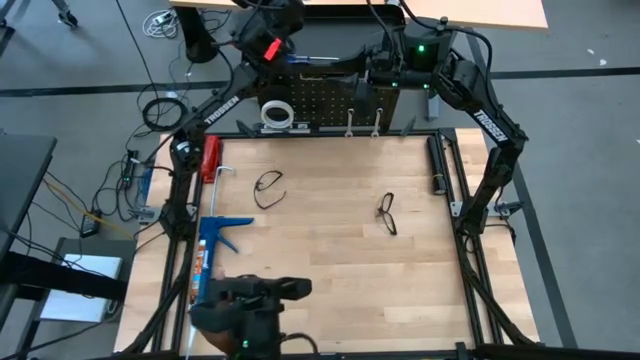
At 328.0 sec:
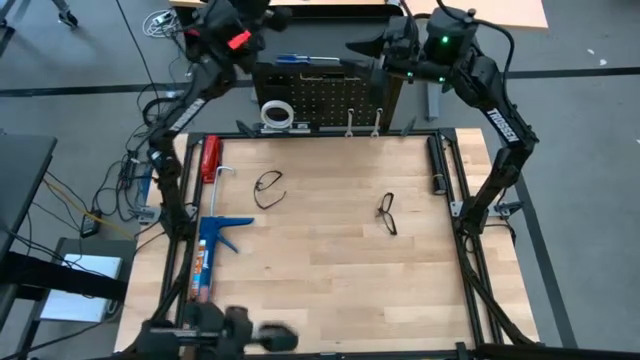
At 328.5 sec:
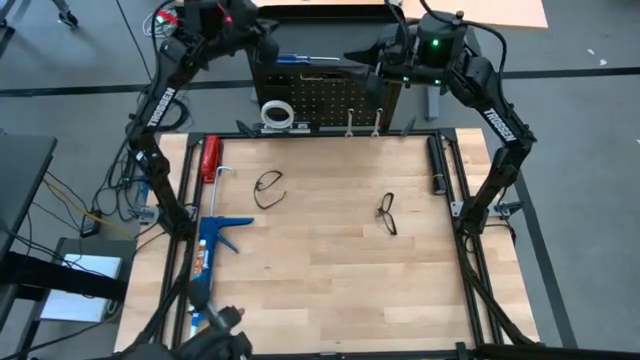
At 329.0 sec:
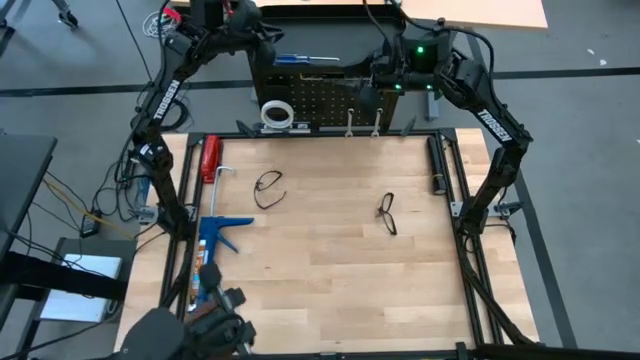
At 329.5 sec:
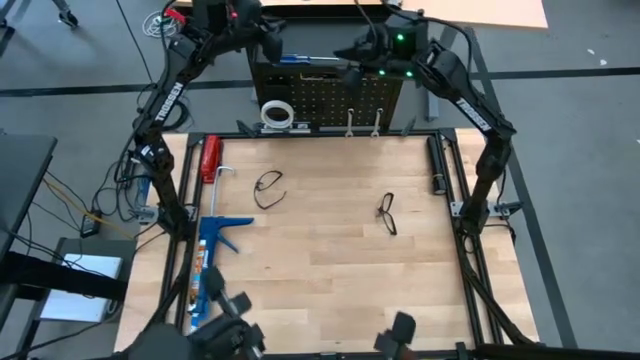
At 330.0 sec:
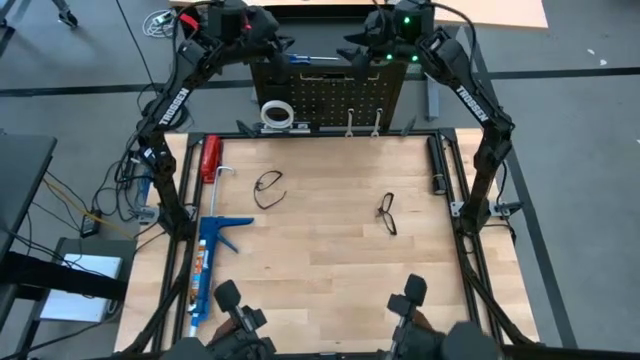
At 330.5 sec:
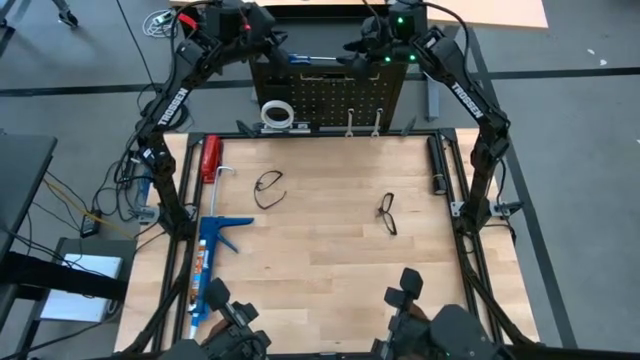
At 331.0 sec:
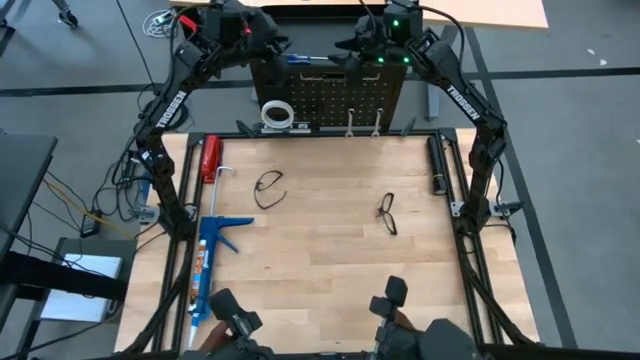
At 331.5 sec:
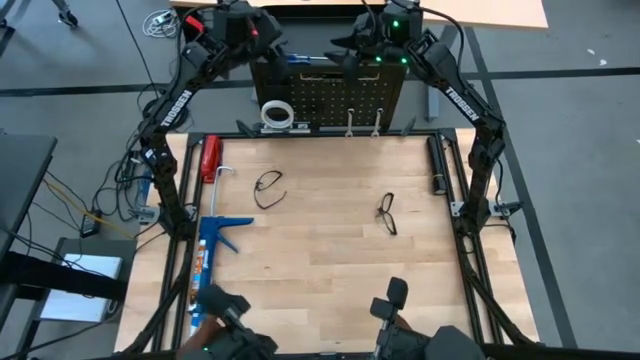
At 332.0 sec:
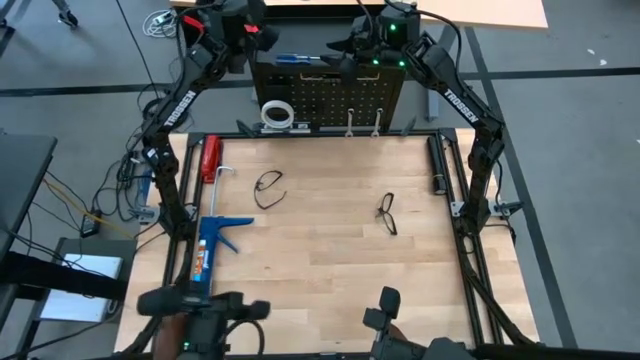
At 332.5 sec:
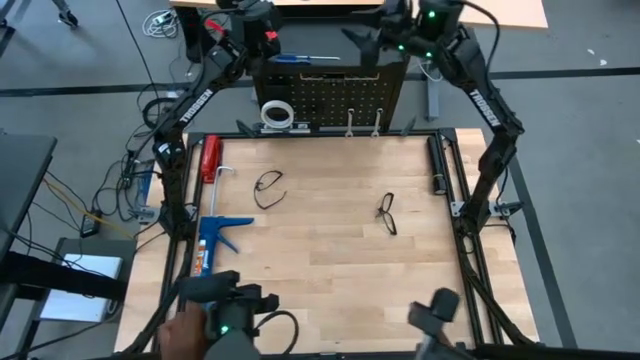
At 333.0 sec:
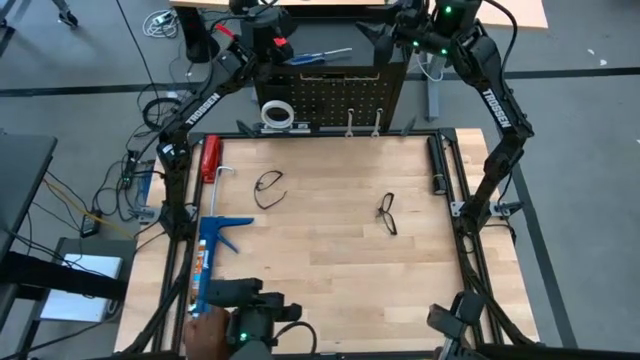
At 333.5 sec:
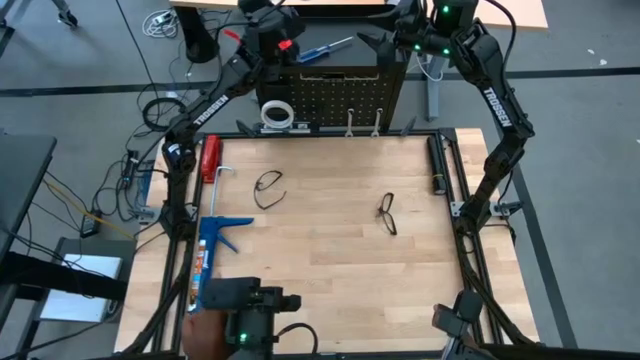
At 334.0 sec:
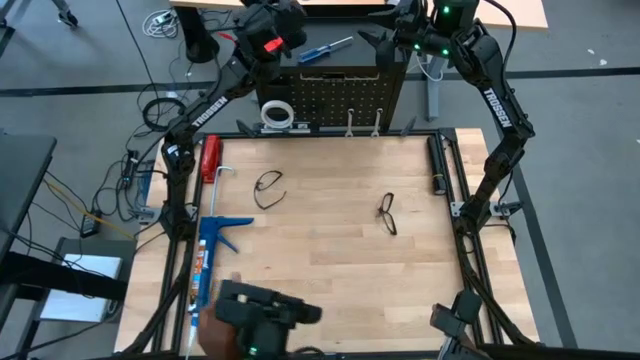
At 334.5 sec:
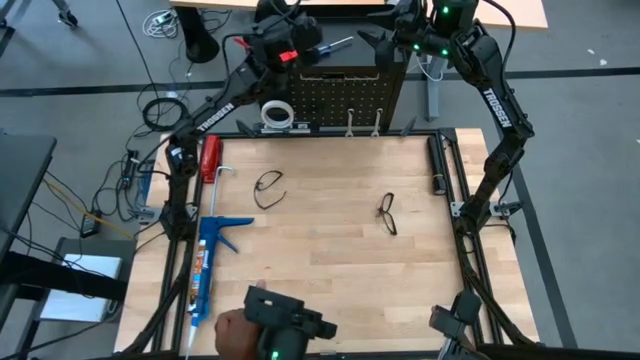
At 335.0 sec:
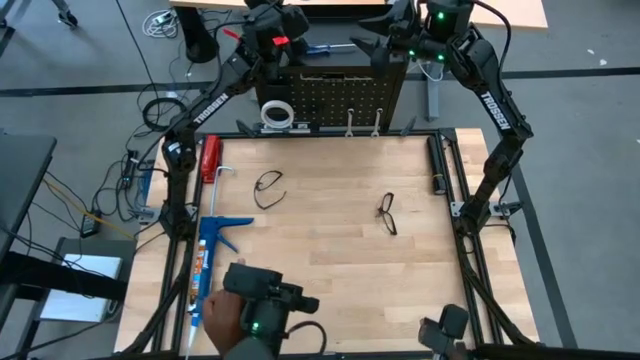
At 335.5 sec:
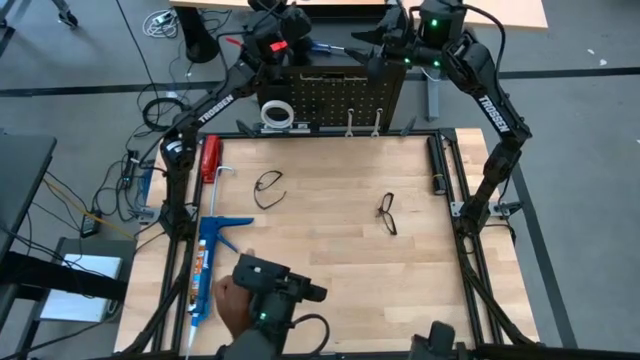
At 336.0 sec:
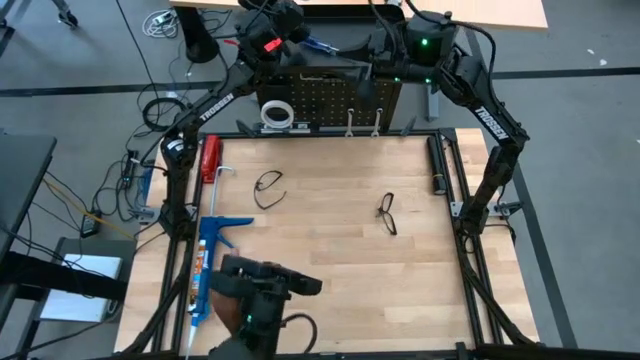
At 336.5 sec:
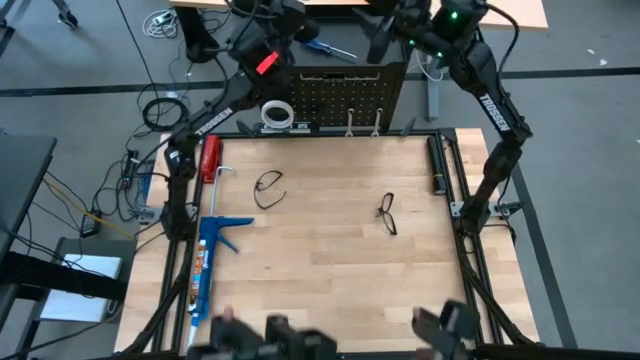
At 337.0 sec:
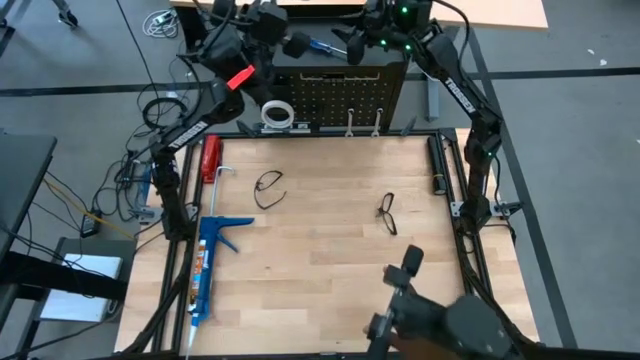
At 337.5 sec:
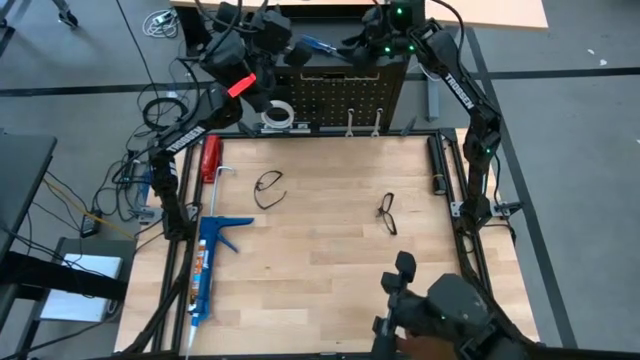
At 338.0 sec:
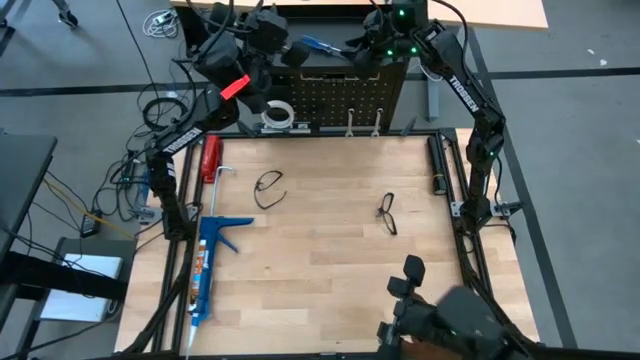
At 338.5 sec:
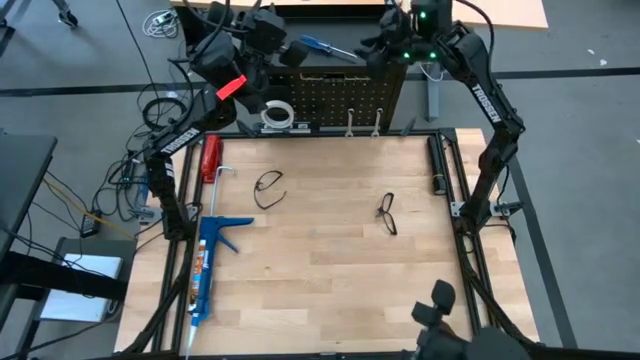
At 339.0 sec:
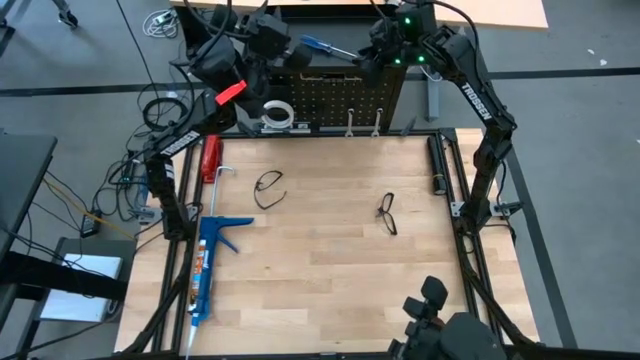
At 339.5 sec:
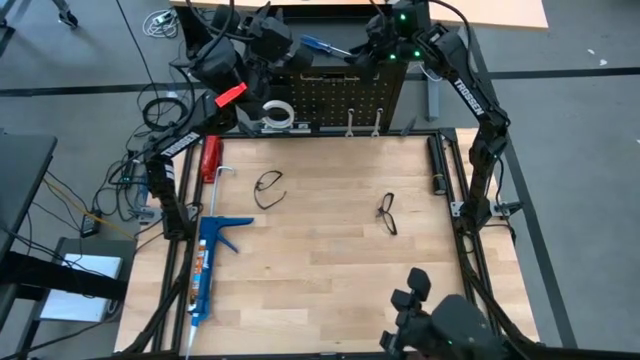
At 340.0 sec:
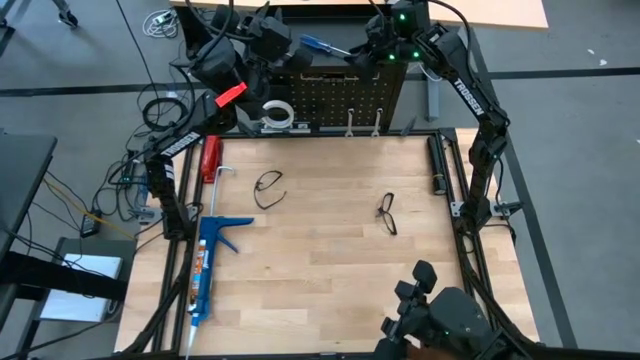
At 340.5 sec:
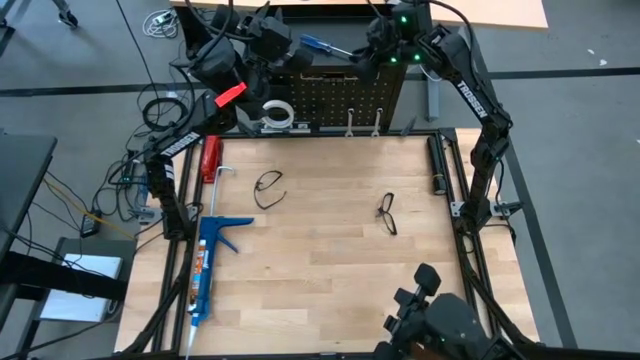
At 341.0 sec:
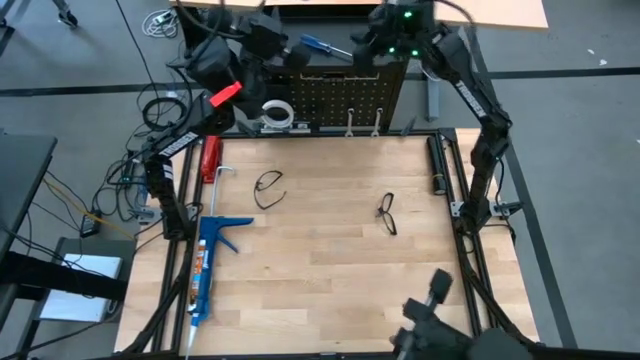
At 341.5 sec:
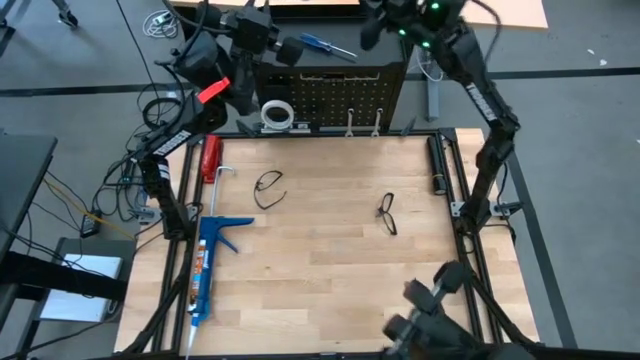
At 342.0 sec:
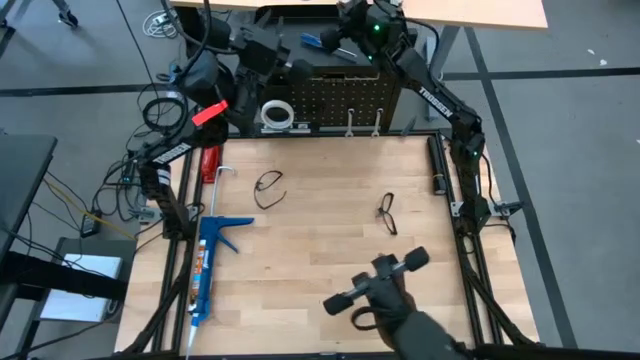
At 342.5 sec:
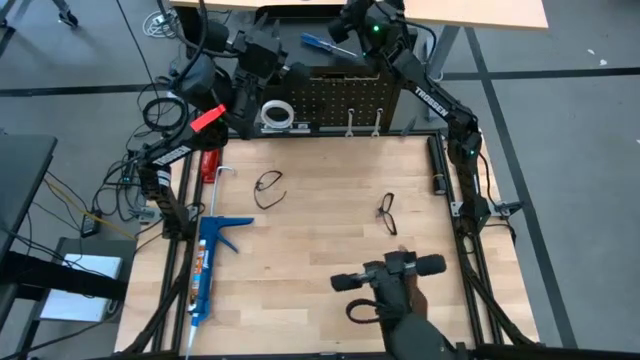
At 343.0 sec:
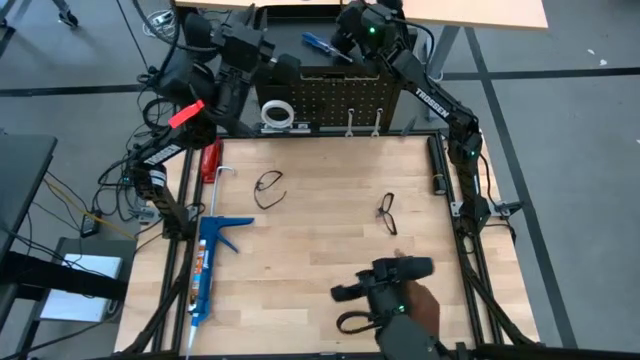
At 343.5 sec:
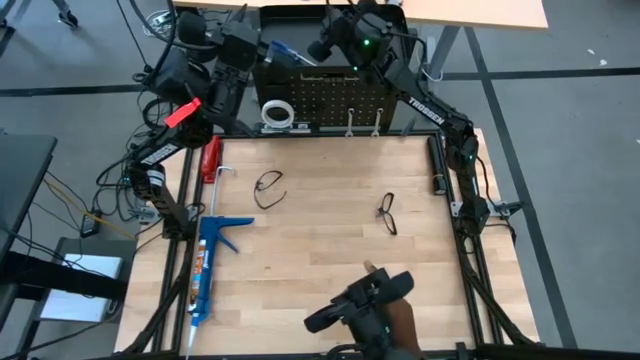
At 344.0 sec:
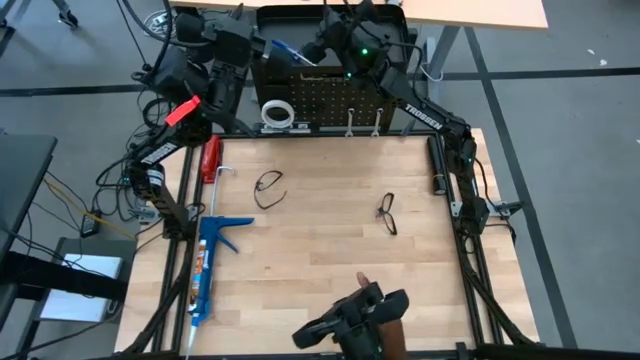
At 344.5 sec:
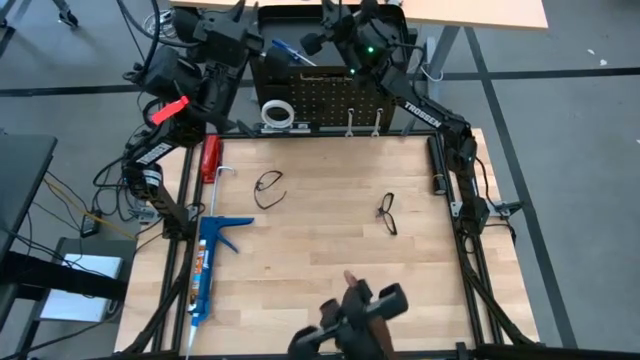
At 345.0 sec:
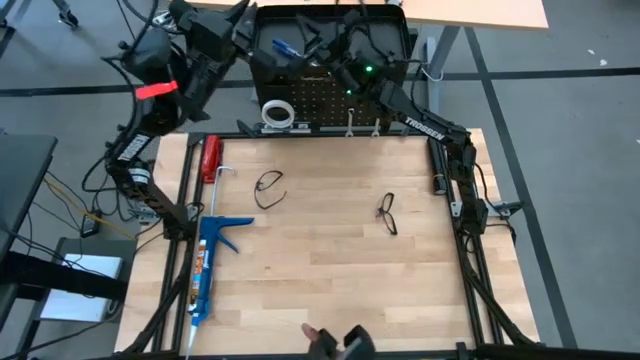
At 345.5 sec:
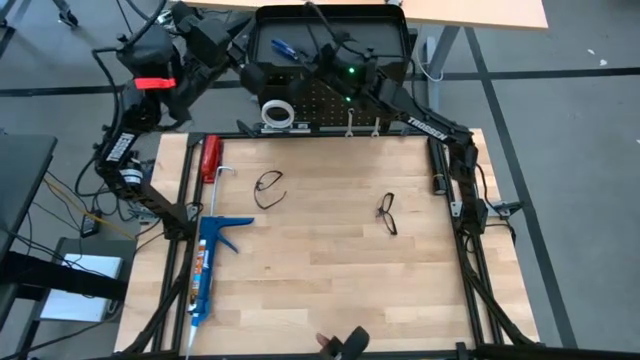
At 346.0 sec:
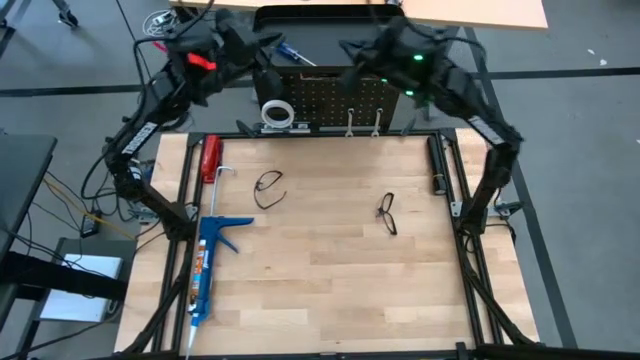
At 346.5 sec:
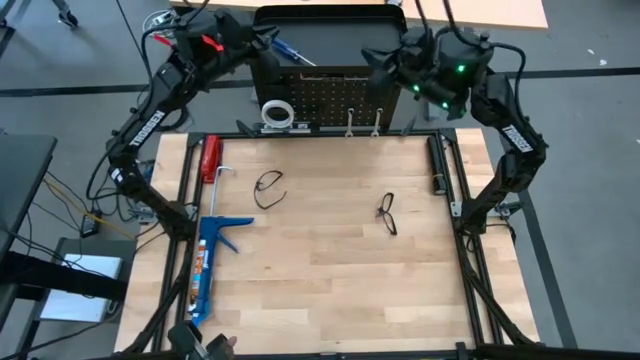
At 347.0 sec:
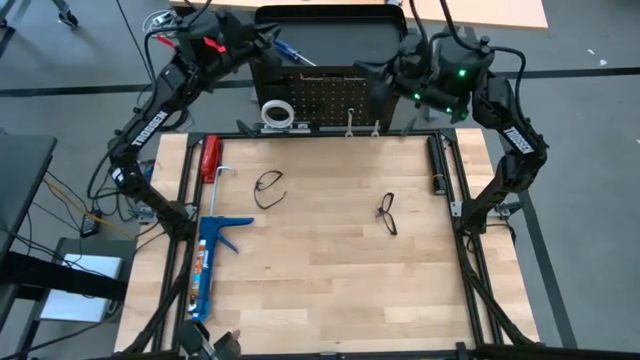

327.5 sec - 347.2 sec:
Task: Hang tools onto peg board
Remove the blue screwdriver from the black pegboard

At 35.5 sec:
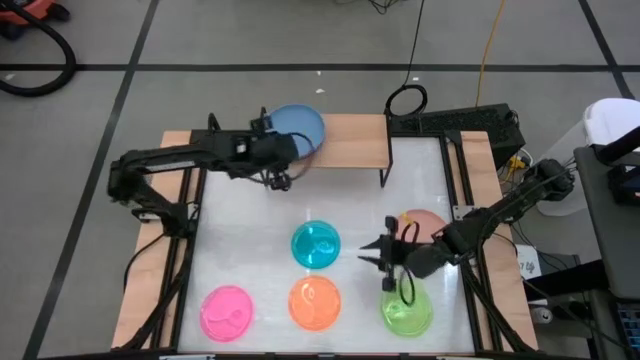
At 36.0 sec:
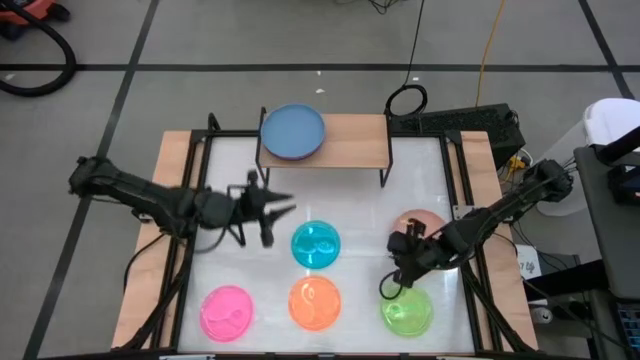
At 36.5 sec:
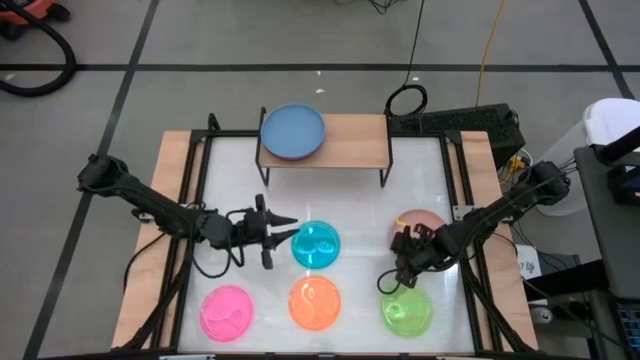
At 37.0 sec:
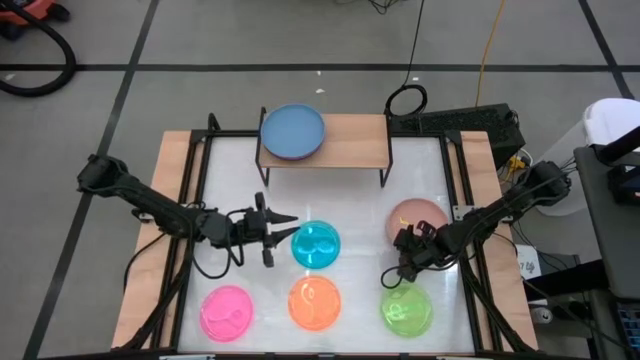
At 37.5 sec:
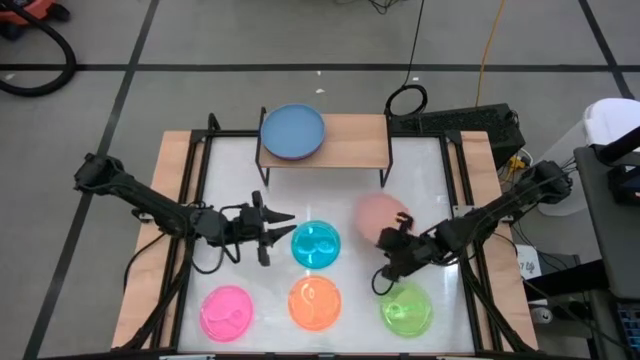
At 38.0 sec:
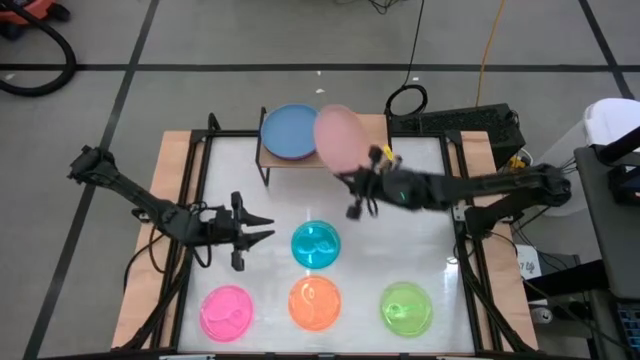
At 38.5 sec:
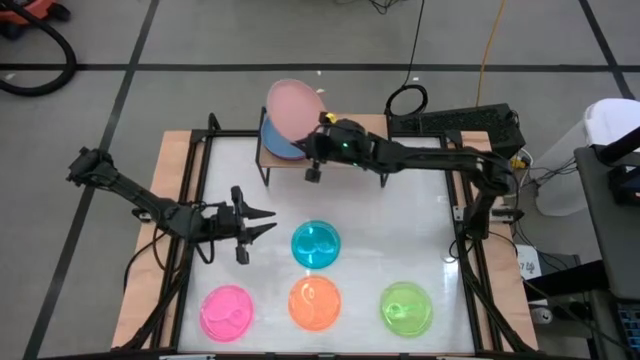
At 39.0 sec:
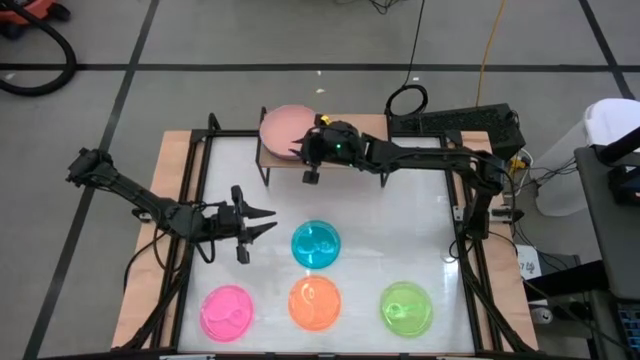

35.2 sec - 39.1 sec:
Task: Place and stack plates onto a shelf
Stack the light pink plate on top of the blue plate on the shelf
